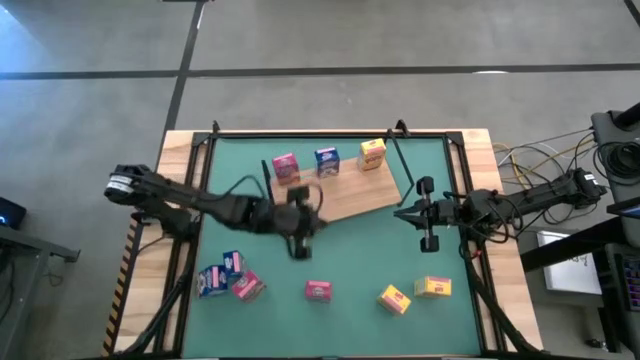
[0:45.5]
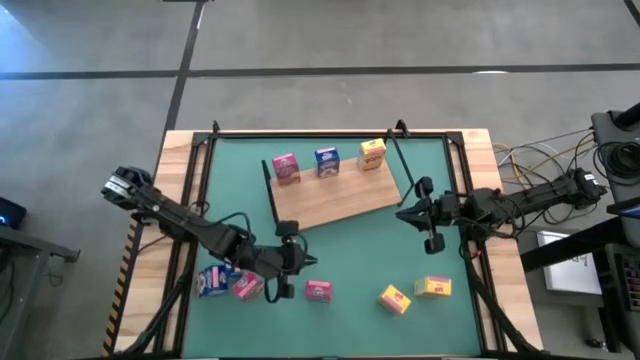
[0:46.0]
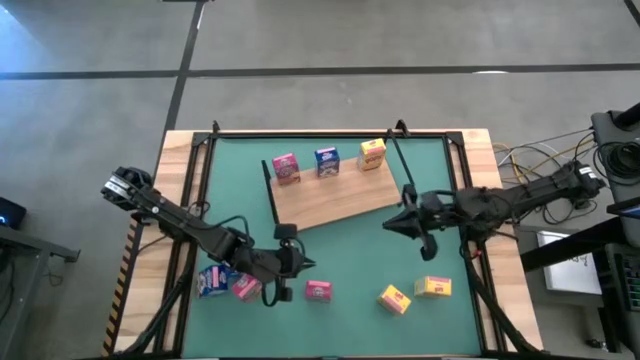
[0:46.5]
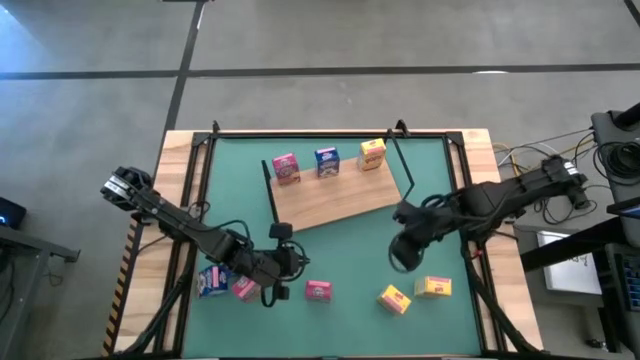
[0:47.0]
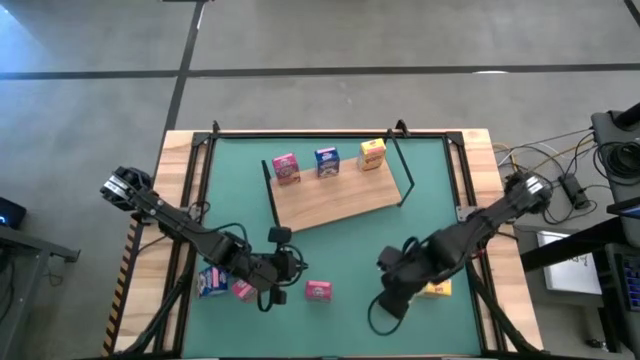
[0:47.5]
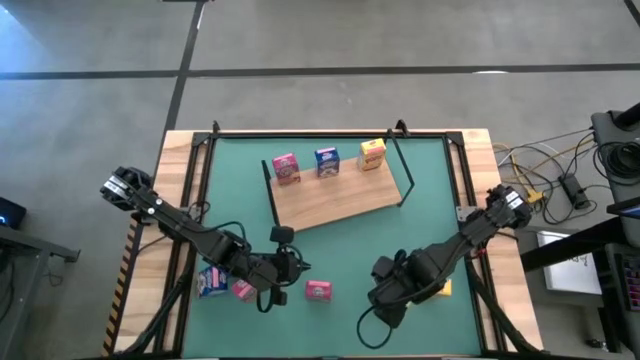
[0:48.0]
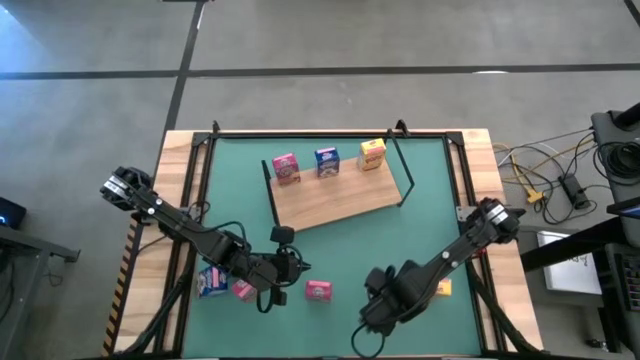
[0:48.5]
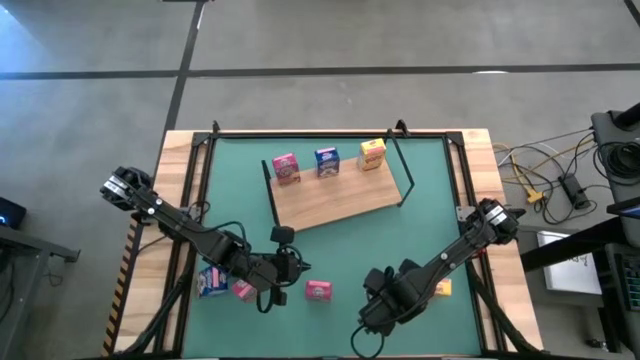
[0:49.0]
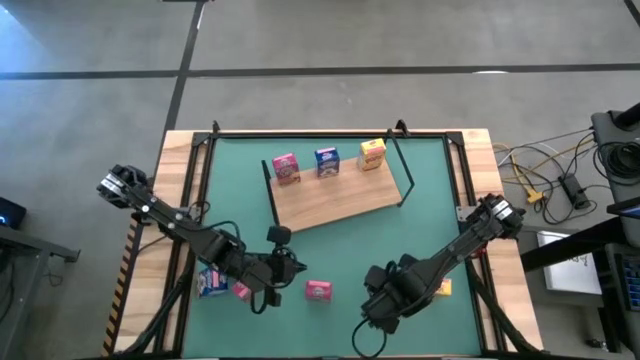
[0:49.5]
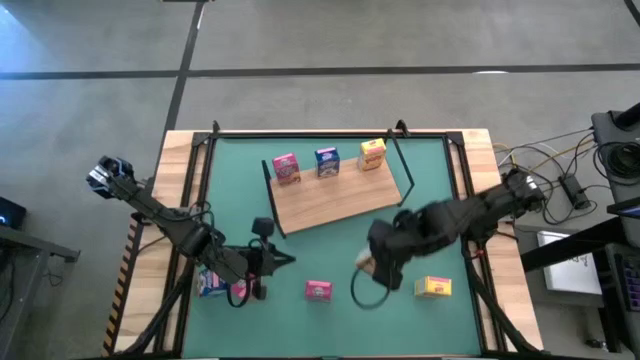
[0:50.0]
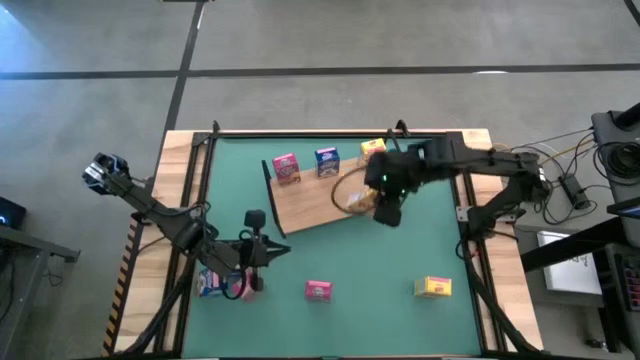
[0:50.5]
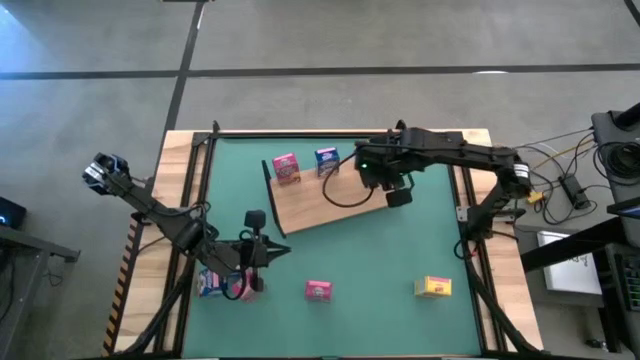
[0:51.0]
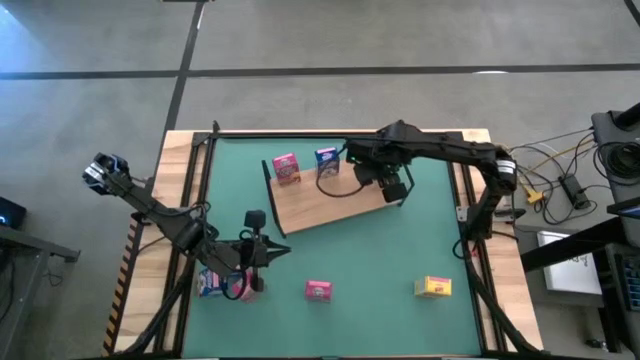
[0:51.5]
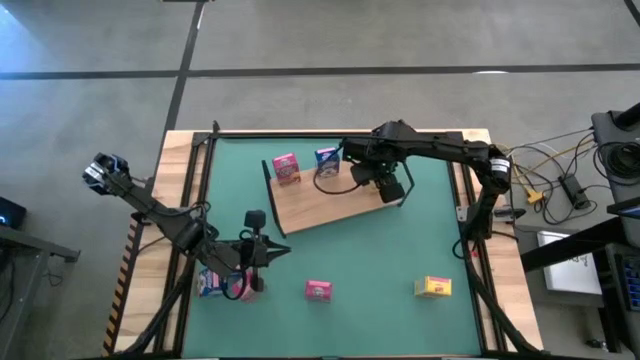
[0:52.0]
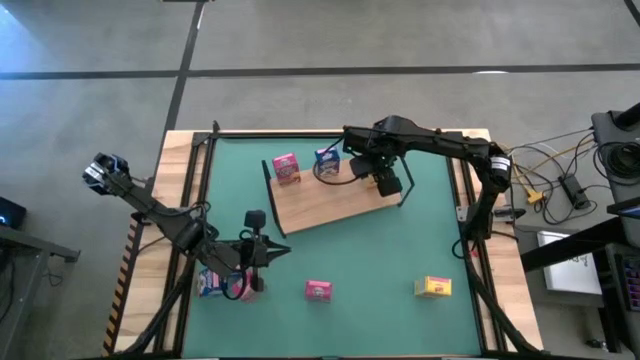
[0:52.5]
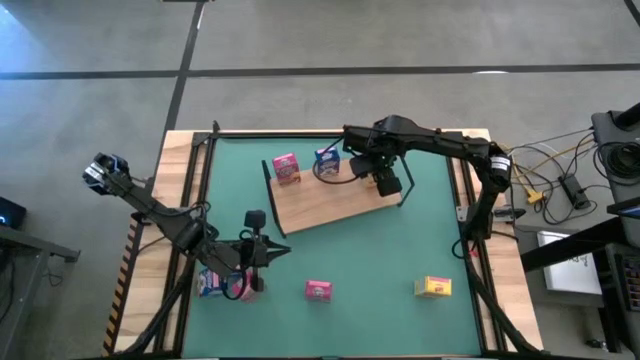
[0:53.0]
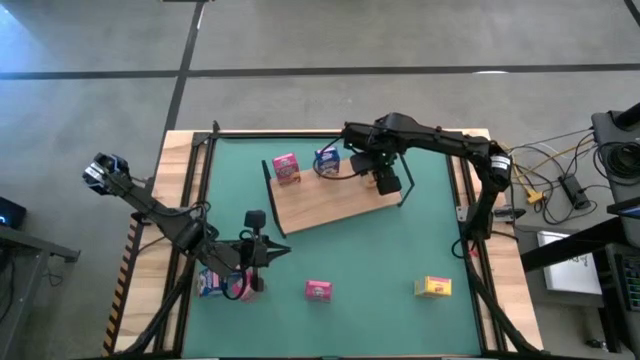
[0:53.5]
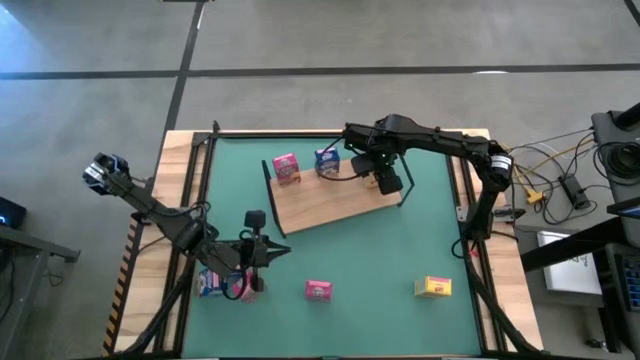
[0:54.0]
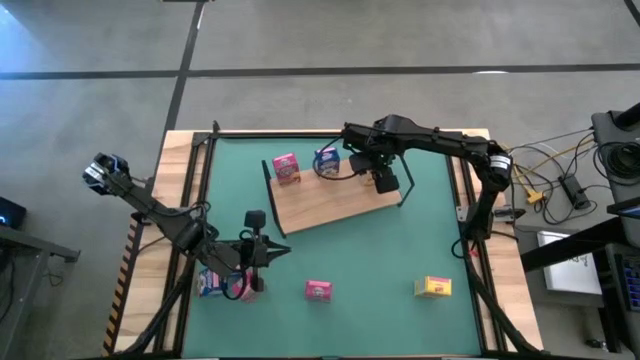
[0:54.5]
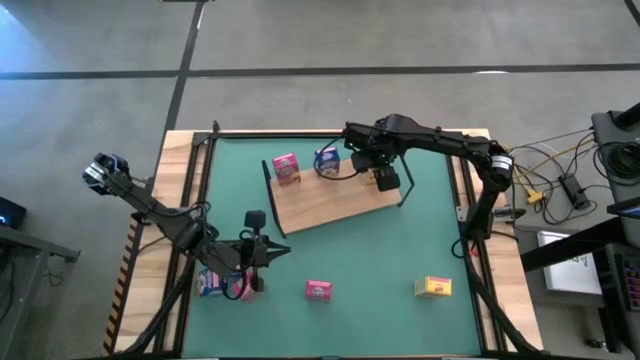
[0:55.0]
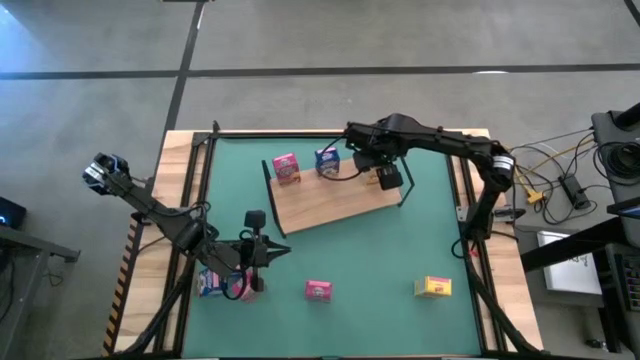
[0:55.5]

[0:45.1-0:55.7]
Task: Stack cereal on shelf
Put the left yellow cereal box on the shelf aligned with the other yellow cereal box

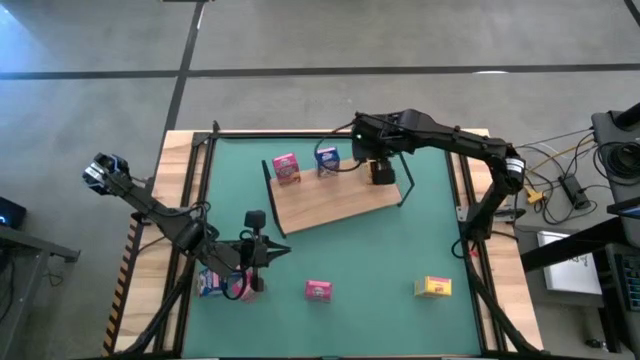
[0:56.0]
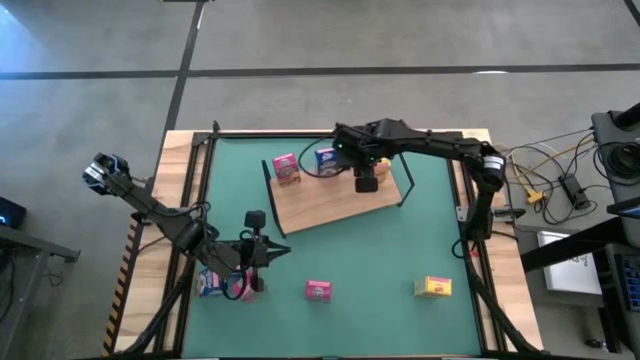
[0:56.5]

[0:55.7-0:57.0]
Adjust the yellow cereal box on the shelf

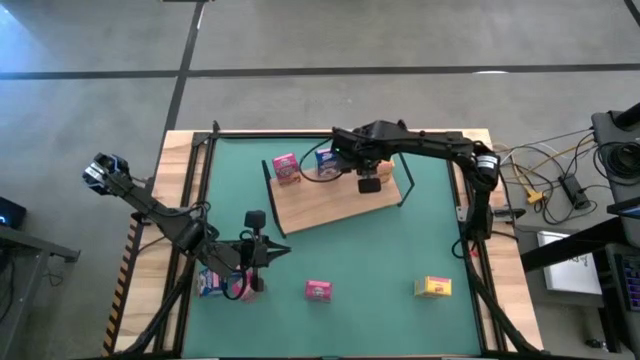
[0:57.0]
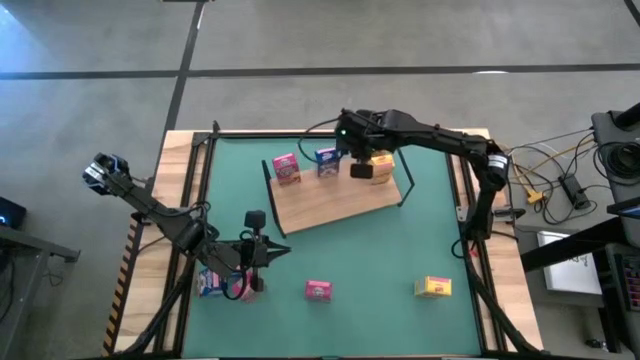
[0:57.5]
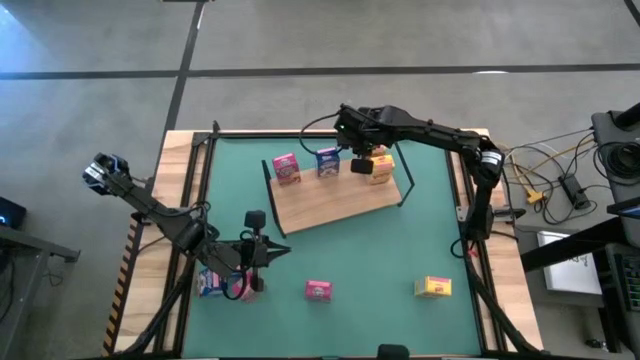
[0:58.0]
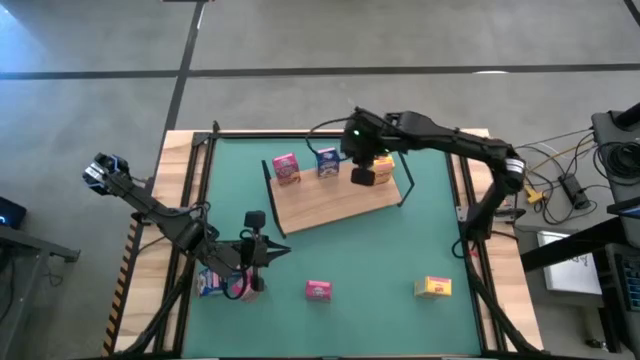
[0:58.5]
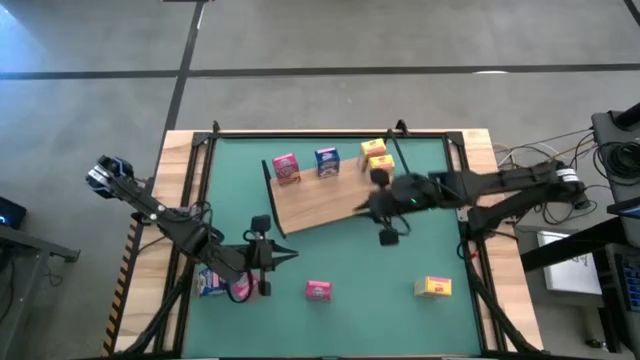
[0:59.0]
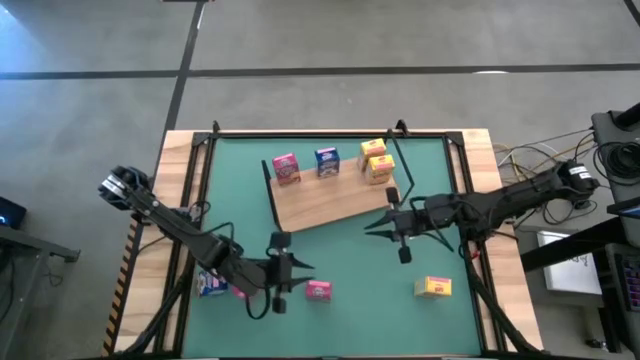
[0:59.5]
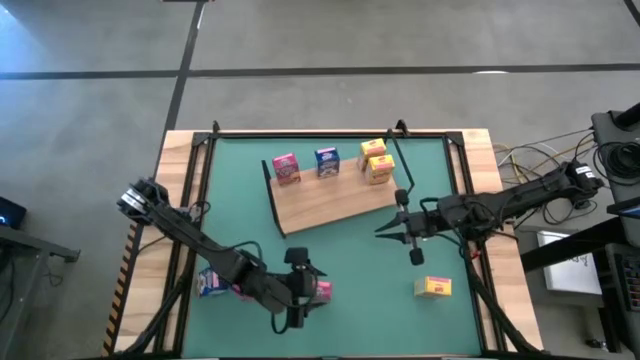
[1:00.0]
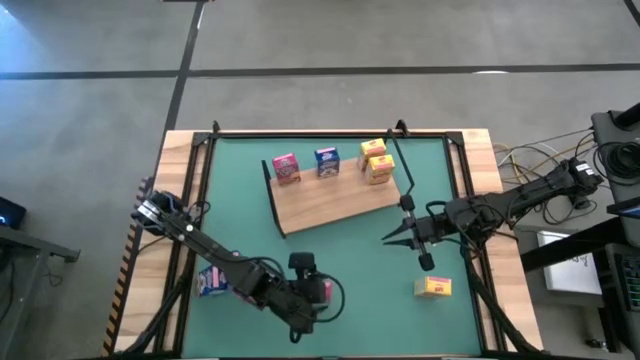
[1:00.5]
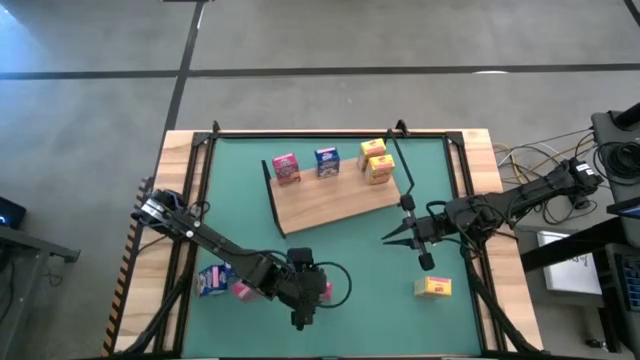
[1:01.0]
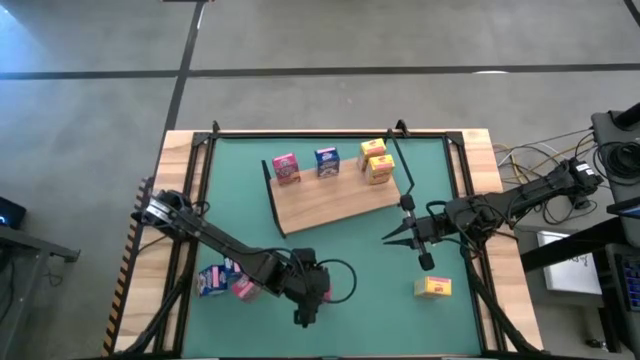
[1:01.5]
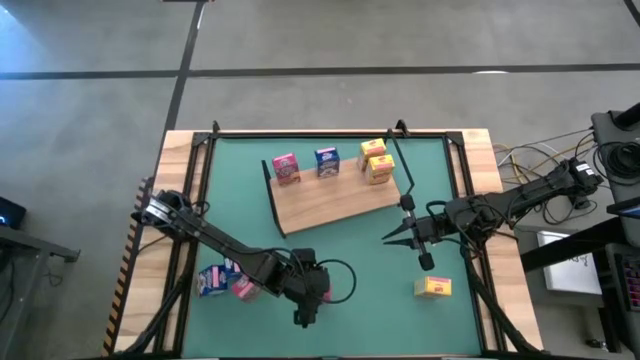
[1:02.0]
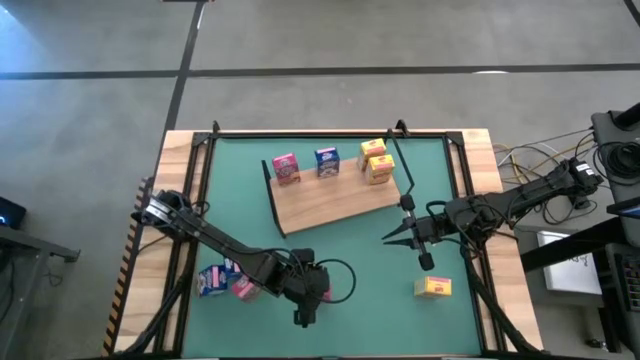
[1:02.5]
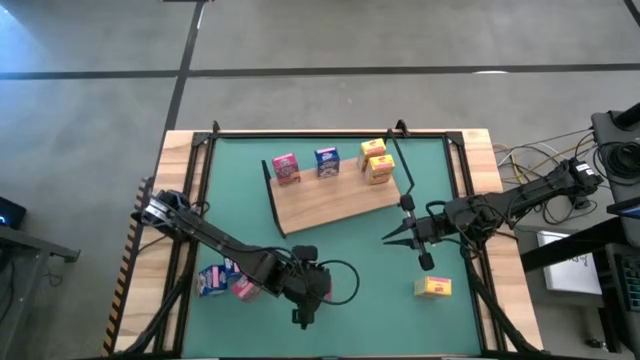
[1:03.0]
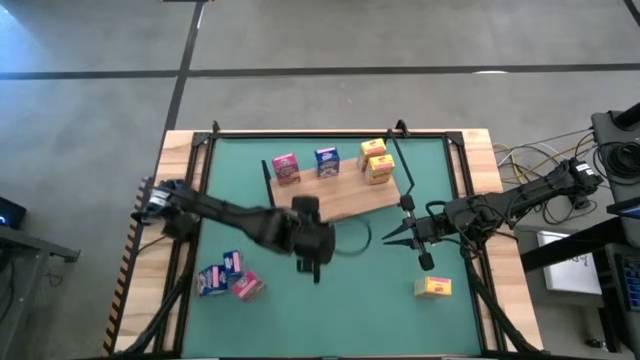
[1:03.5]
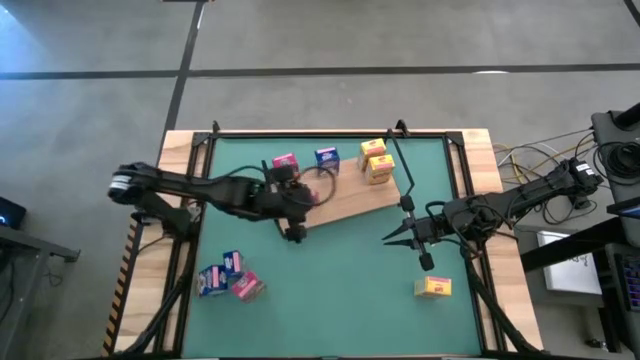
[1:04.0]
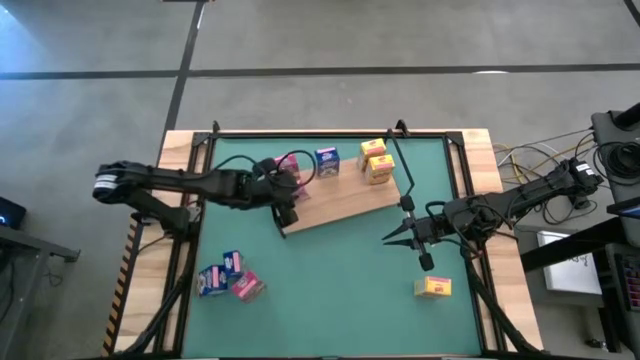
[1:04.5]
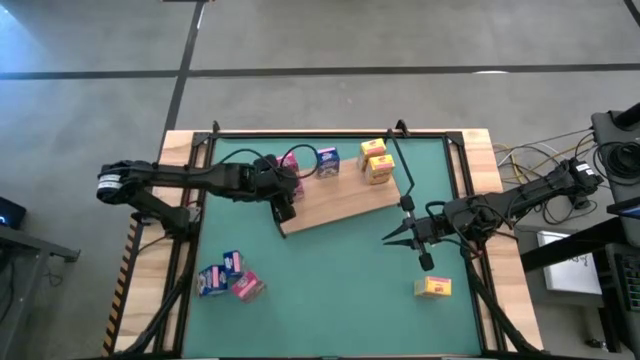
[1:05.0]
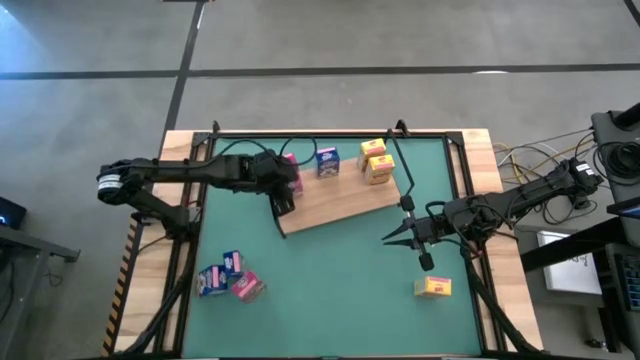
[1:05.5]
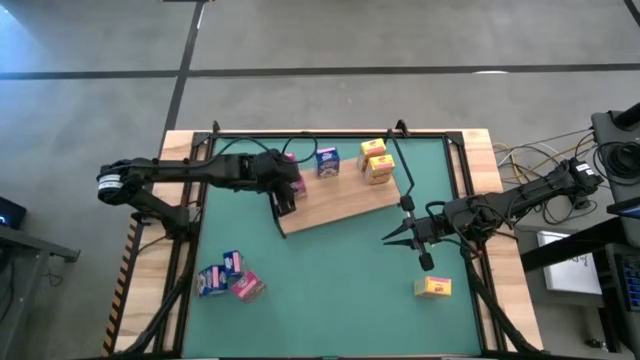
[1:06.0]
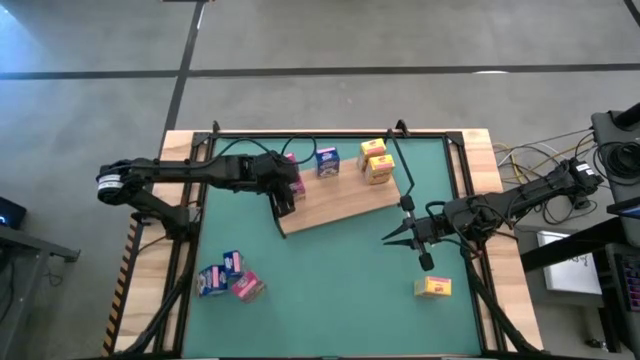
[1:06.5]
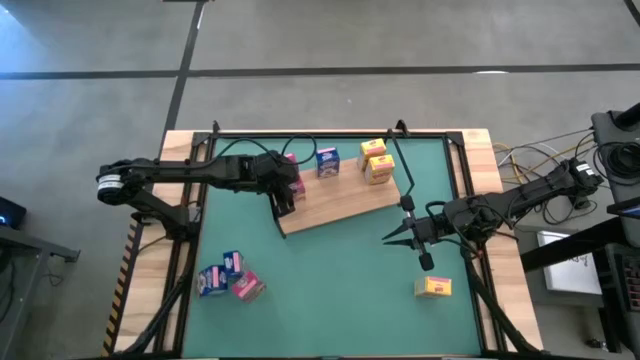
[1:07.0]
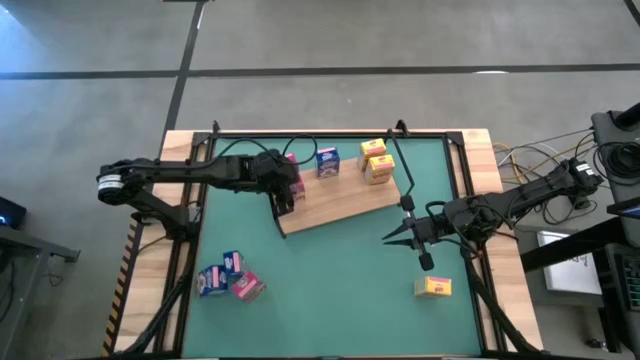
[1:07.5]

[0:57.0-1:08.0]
Put the right pink cereal box on the shelf aligned with the other pink cereal box
